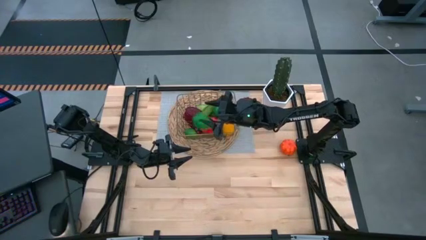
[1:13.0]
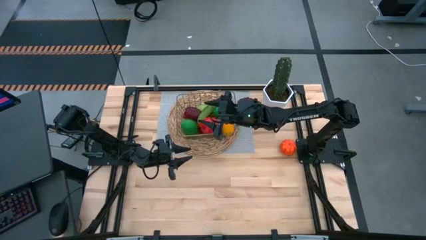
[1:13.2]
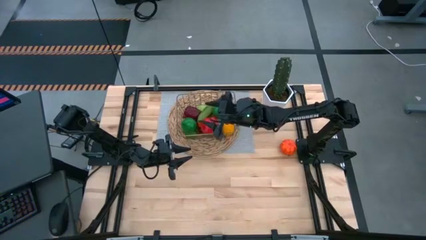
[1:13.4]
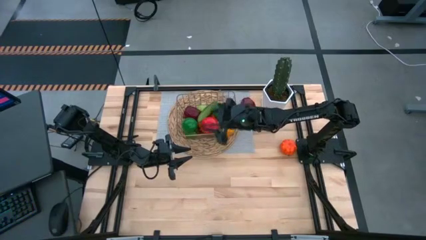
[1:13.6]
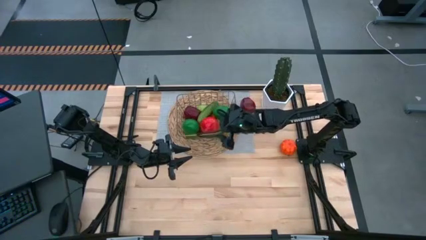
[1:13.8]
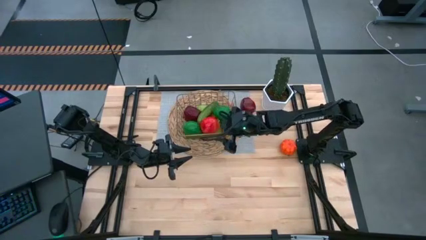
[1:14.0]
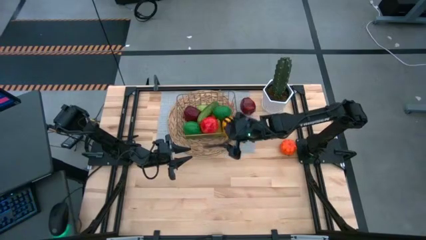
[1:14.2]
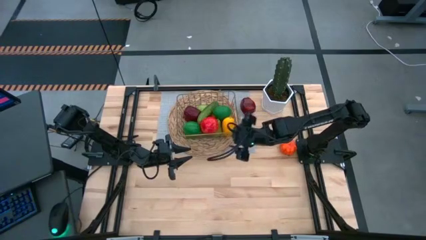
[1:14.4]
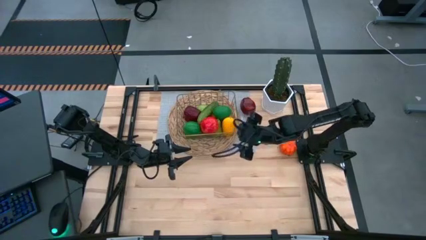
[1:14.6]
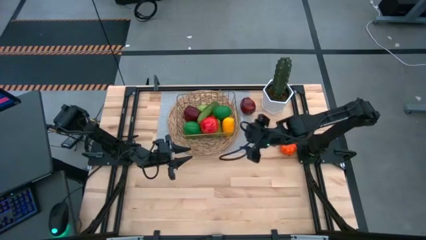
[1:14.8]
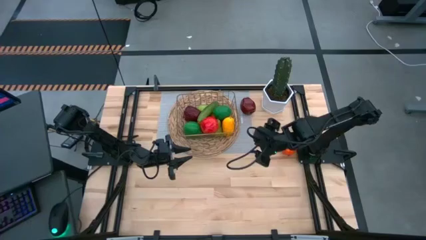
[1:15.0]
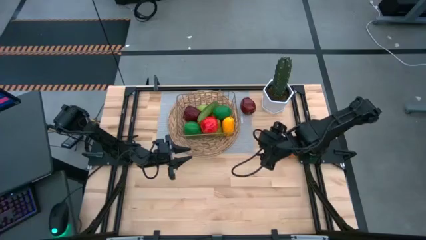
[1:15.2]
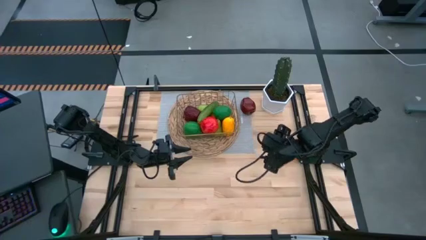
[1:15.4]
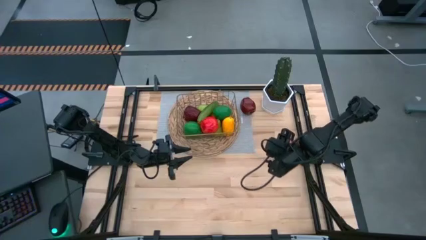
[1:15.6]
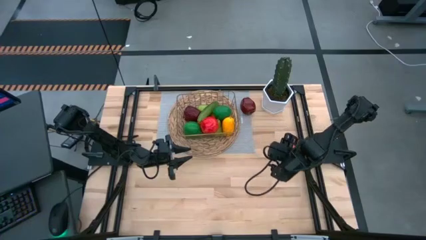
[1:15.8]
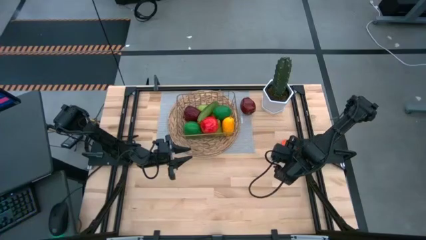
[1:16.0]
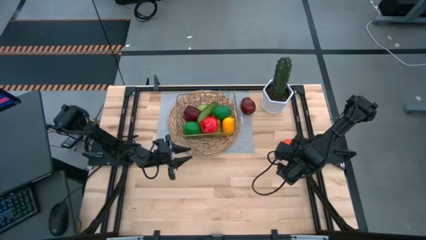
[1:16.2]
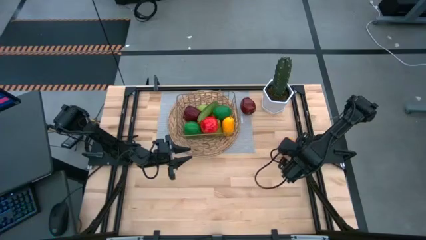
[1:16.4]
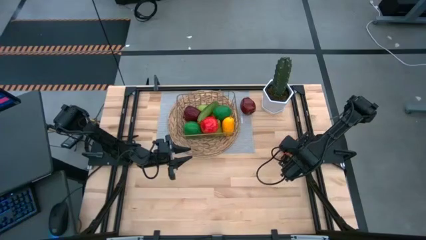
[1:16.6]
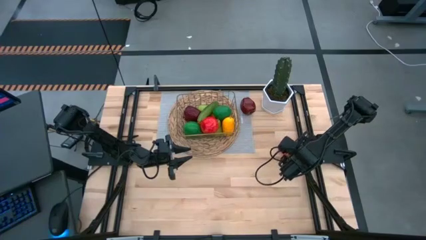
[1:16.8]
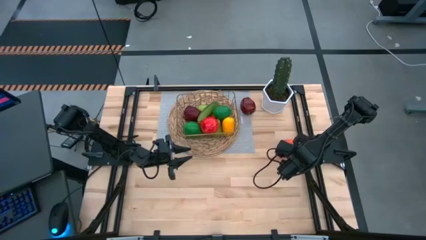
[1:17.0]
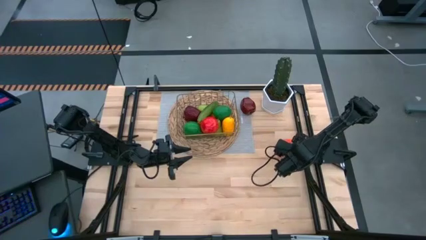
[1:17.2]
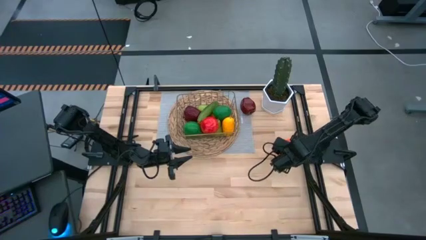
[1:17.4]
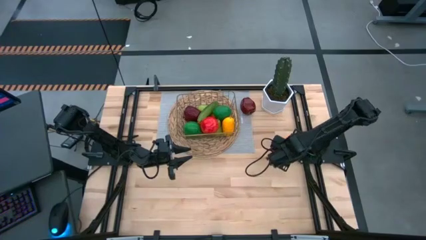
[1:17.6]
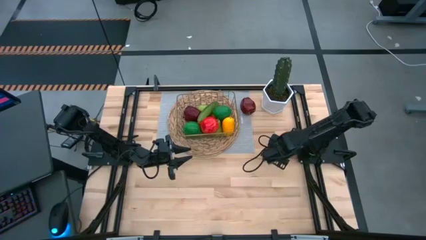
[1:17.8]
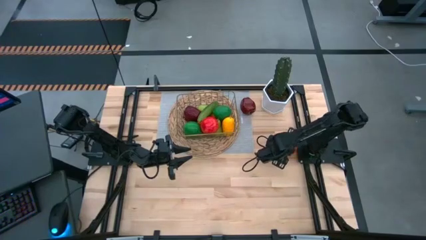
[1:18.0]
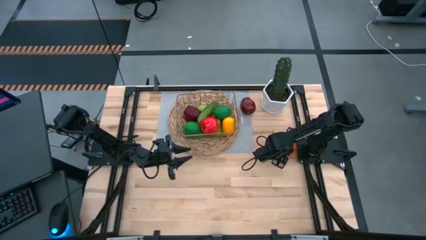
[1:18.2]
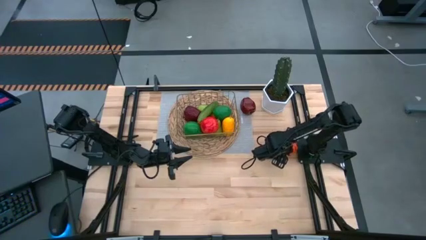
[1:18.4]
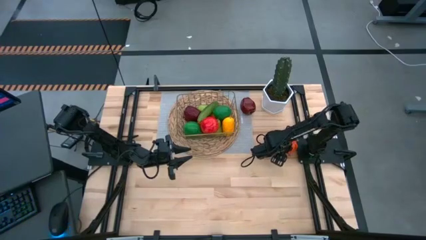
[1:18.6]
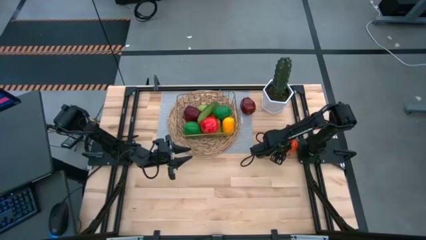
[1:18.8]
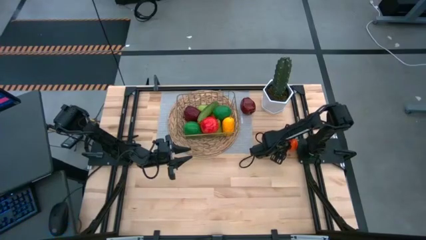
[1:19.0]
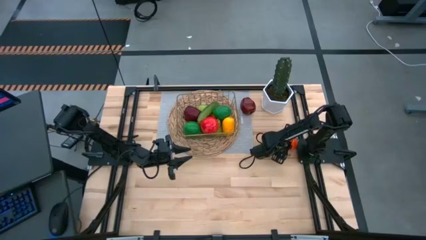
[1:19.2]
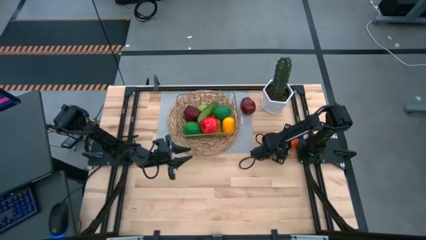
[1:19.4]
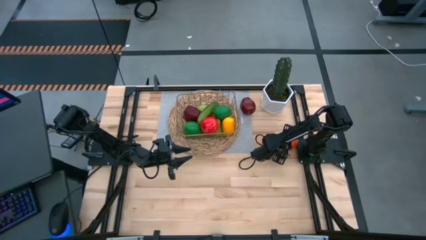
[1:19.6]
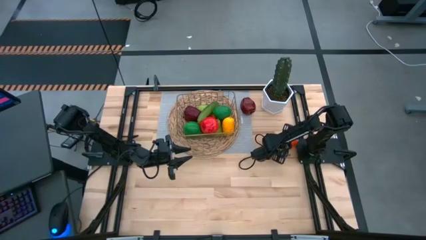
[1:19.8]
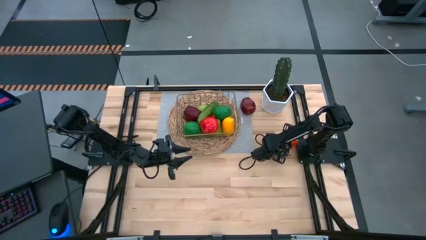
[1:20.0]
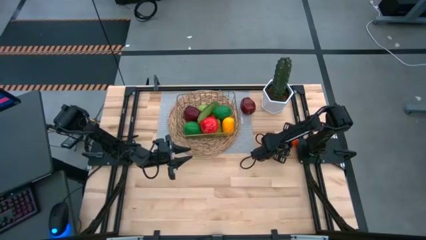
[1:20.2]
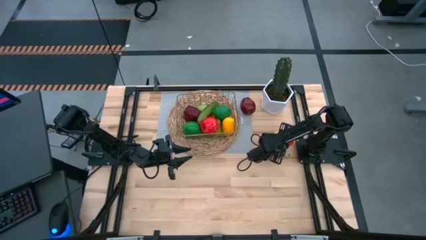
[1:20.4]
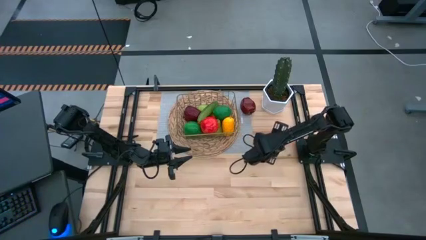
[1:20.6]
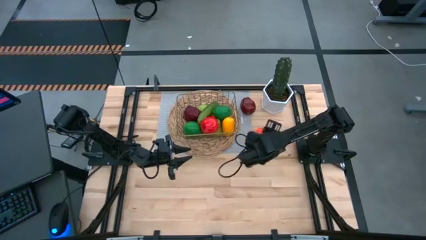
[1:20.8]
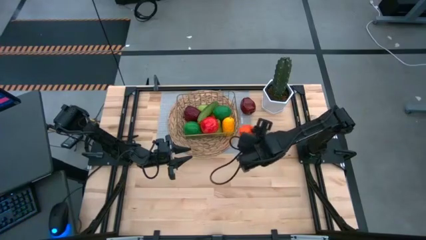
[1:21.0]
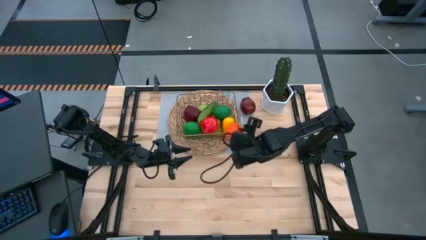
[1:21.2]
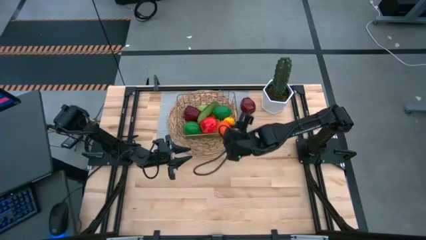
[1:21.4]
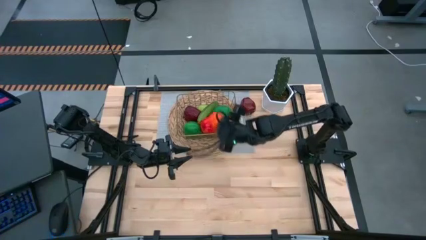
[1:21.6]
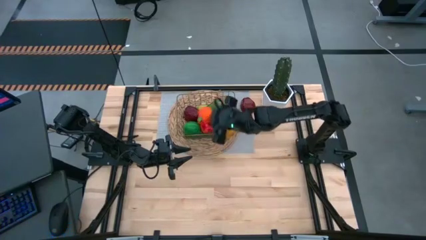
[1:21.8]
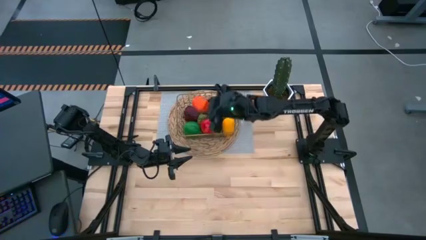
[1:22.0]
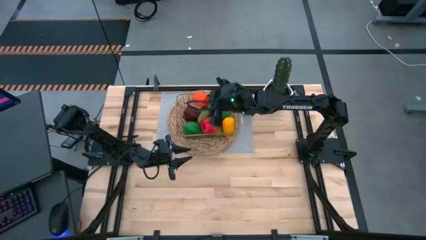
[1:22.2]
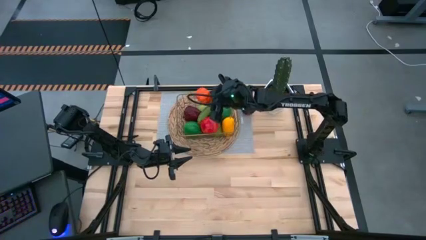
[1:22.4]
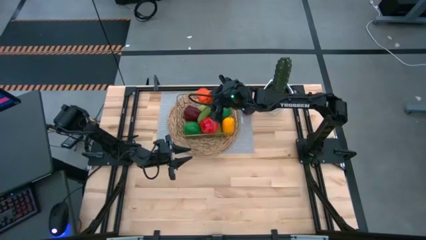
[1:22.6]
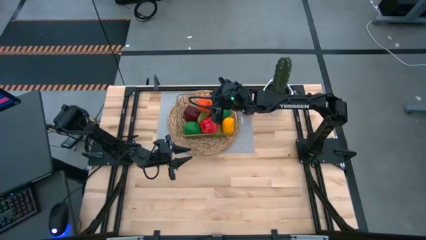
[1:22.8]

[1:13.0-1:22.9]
Task: Build produce basket
Put the orange pumpkin into the gold wire basket

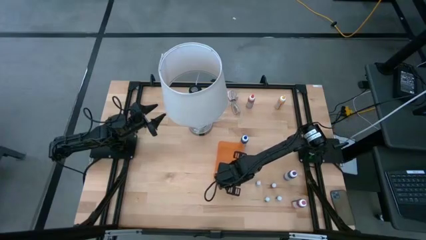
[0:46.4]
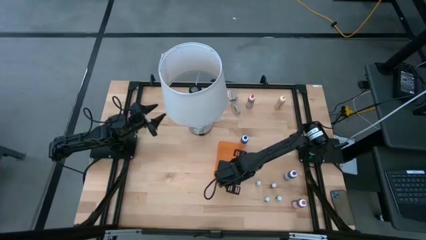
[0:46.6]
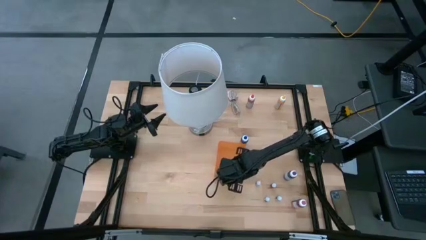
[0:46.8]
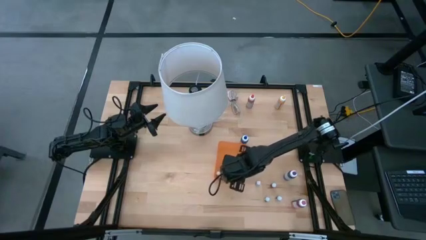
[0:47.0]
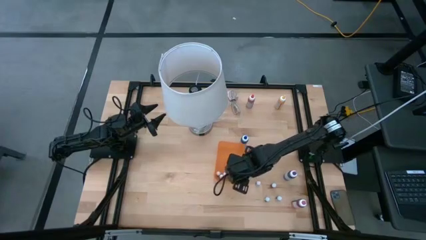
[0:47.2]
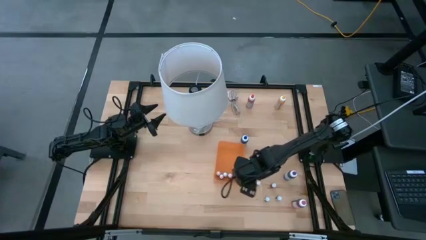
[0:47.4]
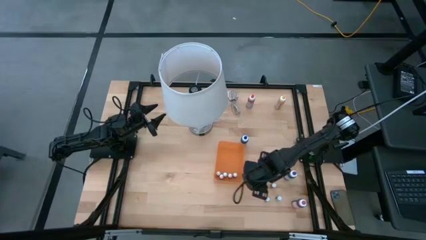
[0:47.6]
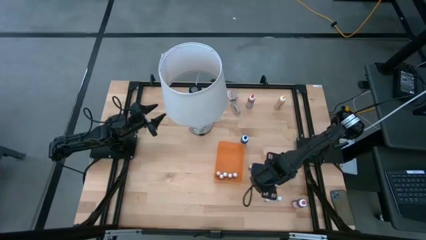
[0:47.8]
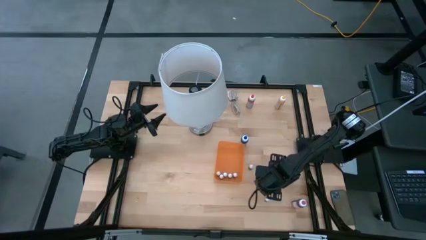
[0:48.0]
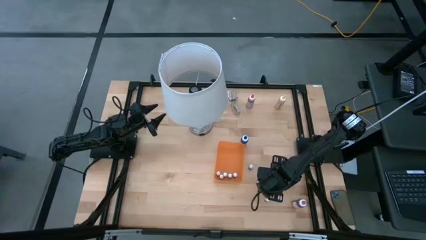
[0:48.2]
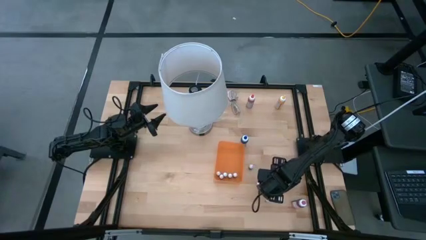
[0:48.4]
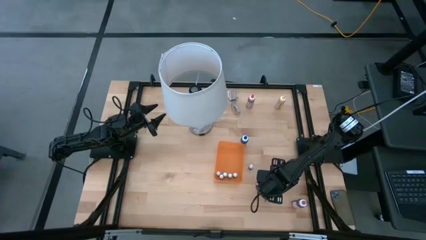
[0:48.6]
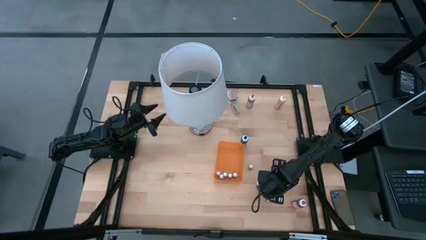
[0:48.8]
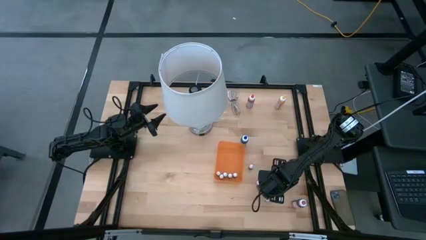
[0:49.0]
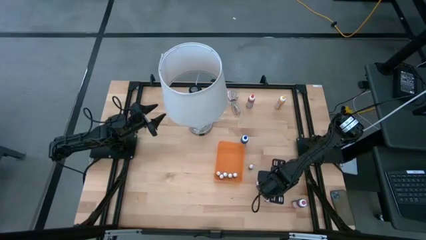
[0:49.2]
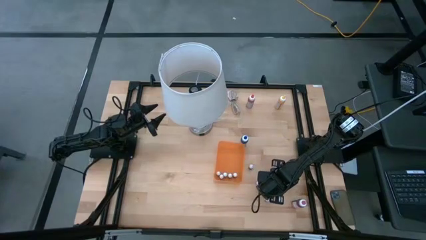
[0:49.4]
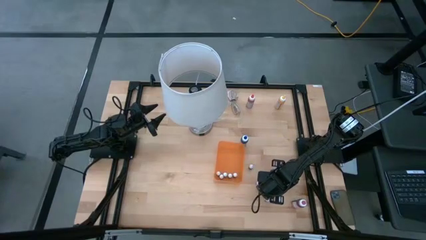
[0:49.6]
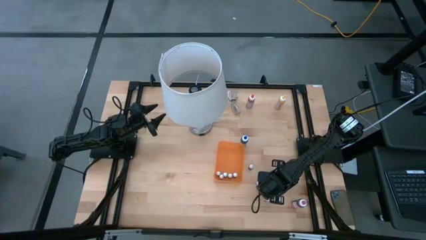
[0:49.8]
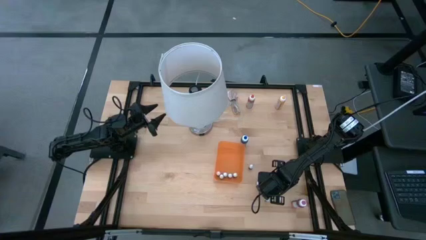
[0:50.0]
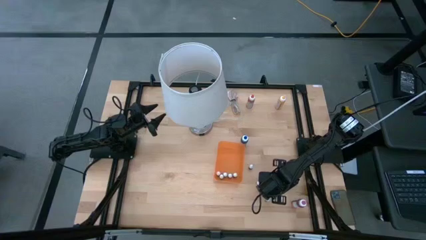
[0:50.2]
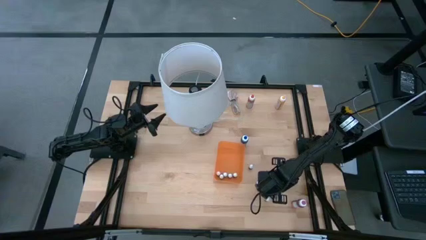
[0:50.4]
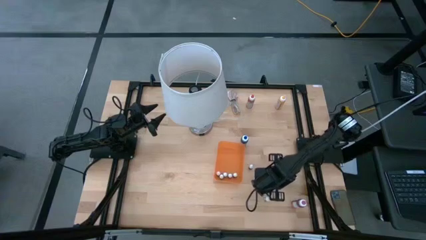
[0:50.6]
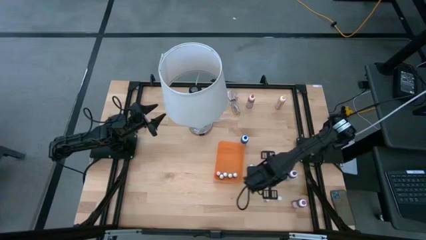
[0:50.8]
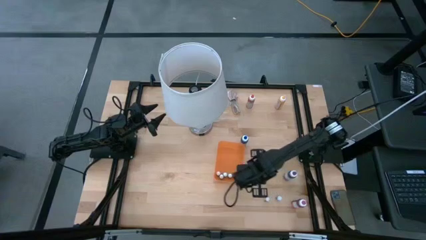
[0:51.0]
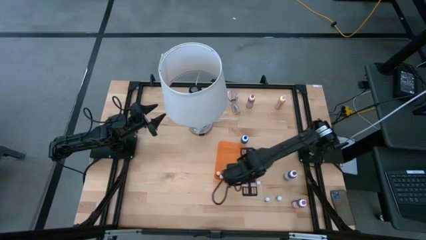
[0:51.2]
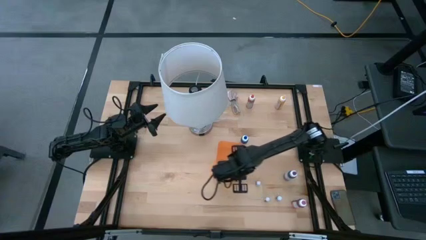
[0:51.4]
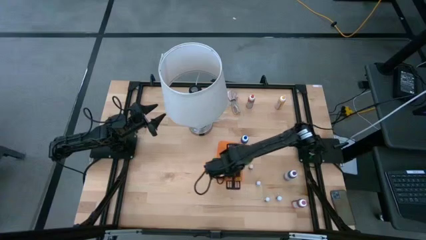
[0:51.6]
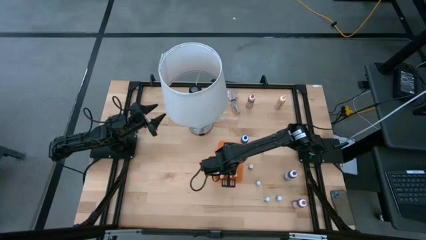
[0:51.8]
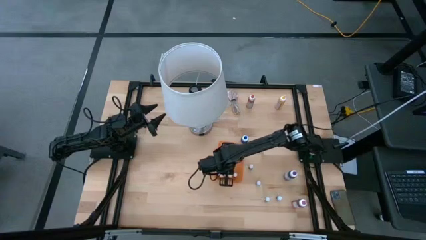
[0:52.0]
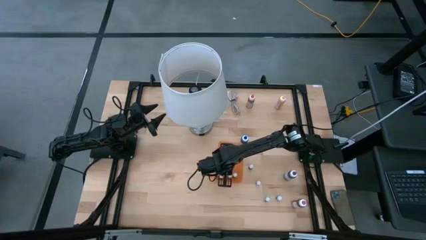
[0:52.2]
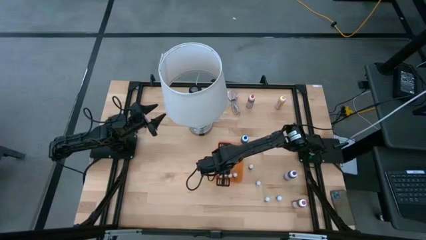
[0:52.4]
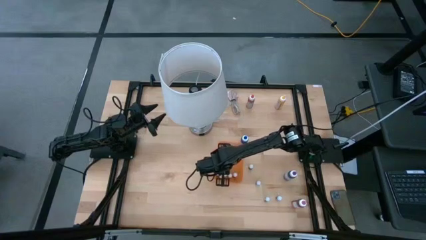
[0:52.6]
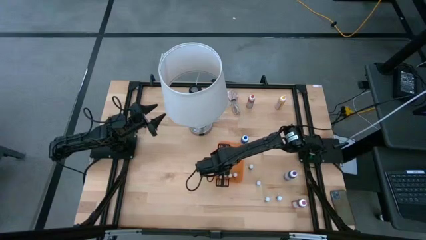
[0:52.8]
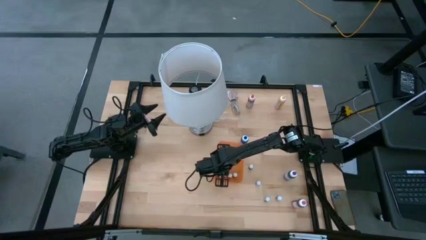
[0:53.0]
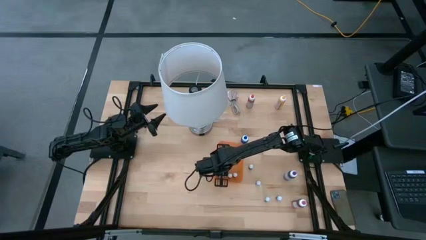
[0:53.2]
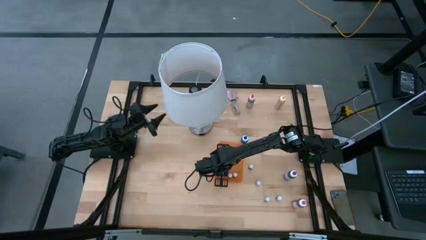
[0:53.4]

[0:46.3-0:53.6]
Task: Pick & Place food coloring
Put the small red food coloring bottle into the orange bin
